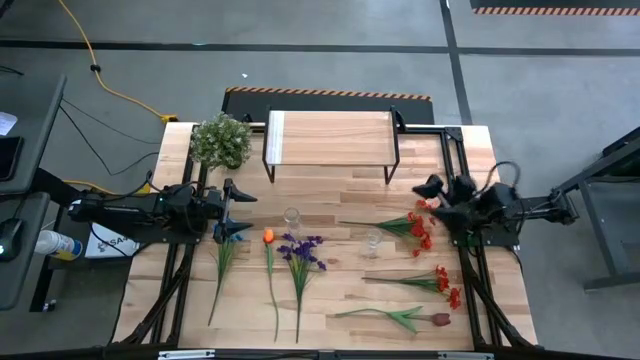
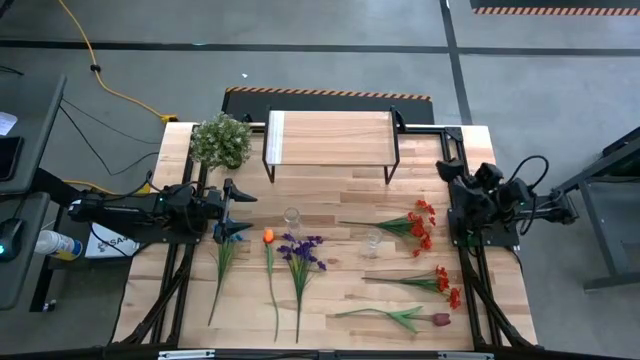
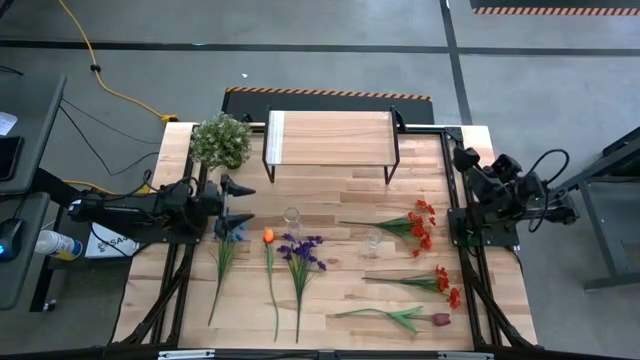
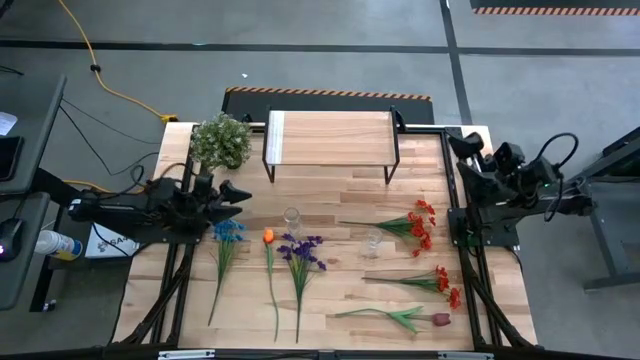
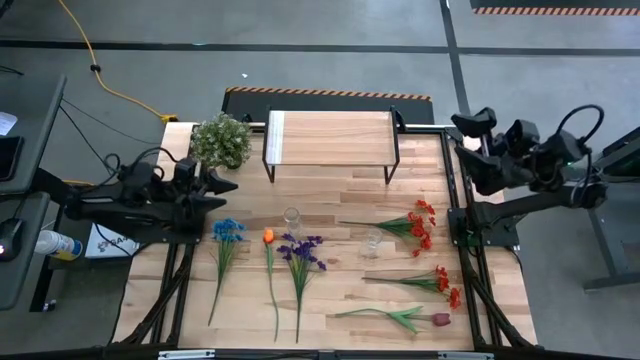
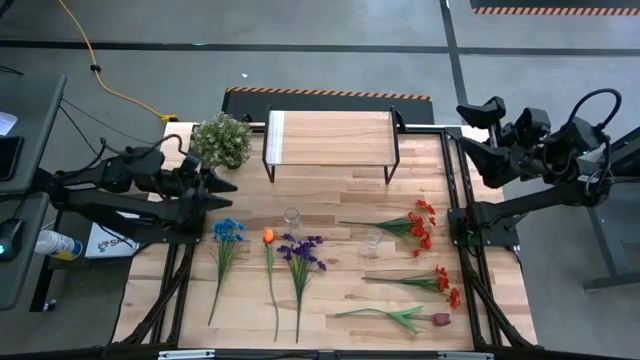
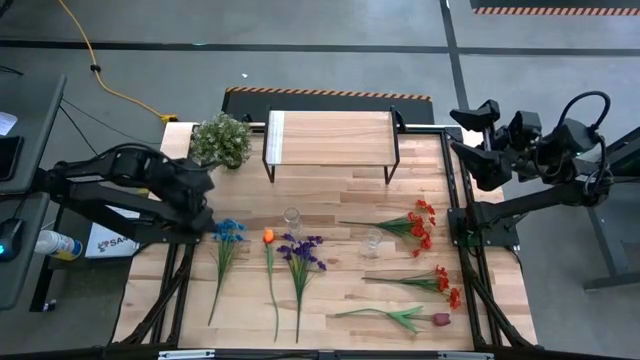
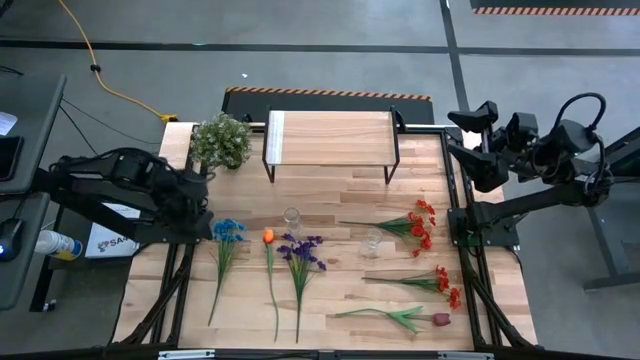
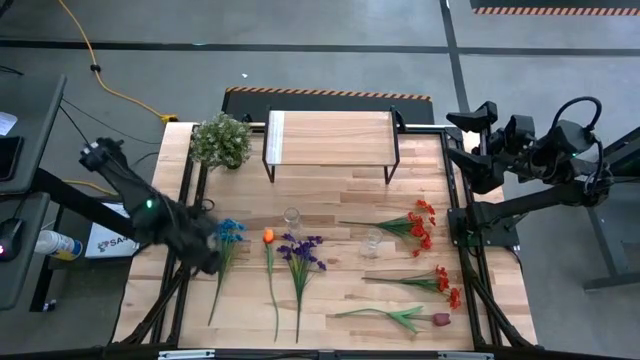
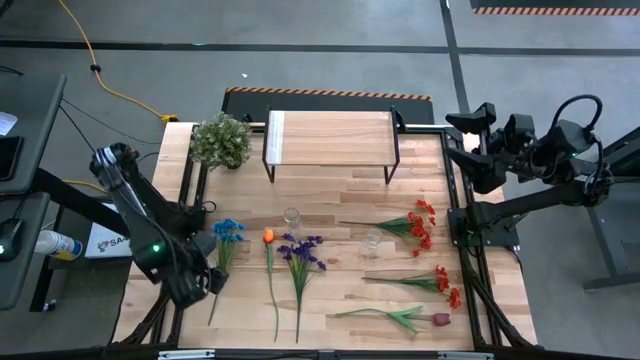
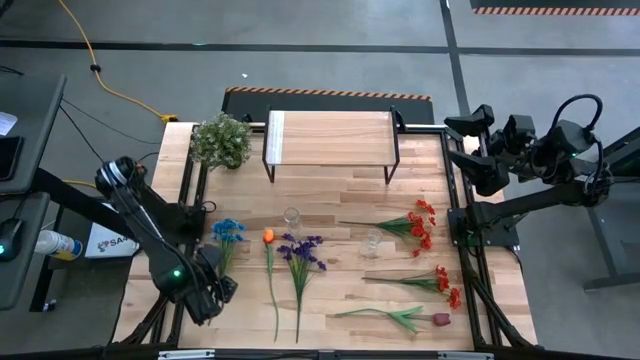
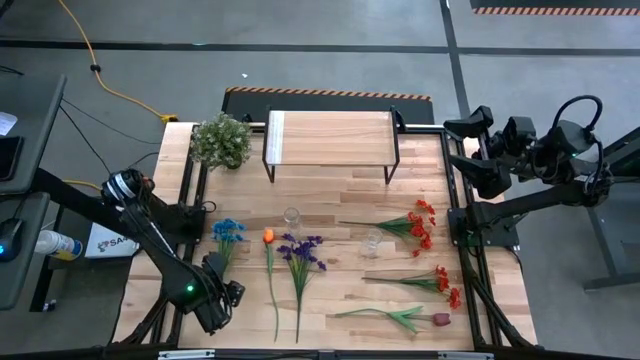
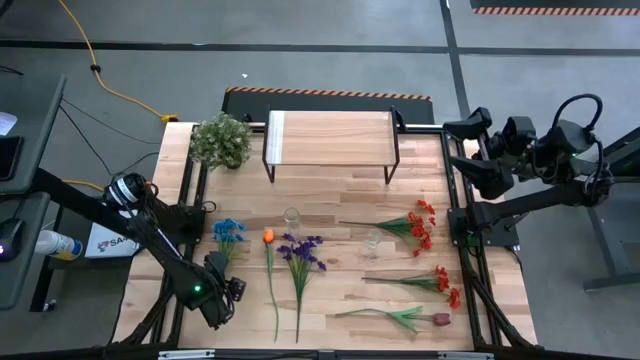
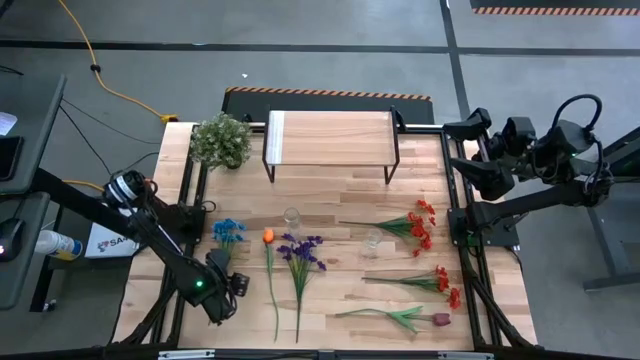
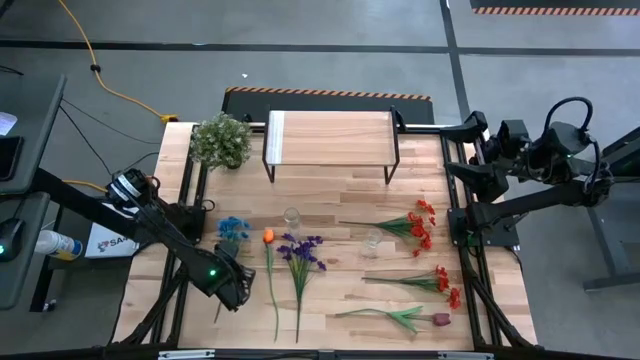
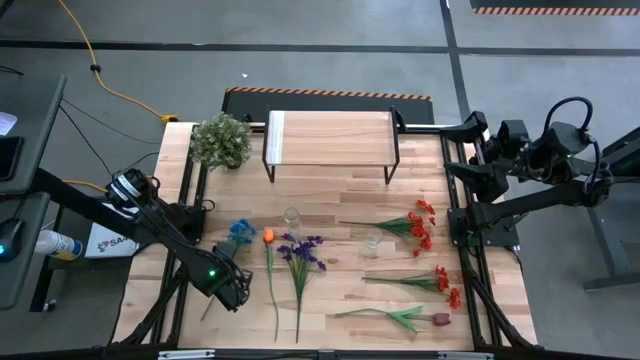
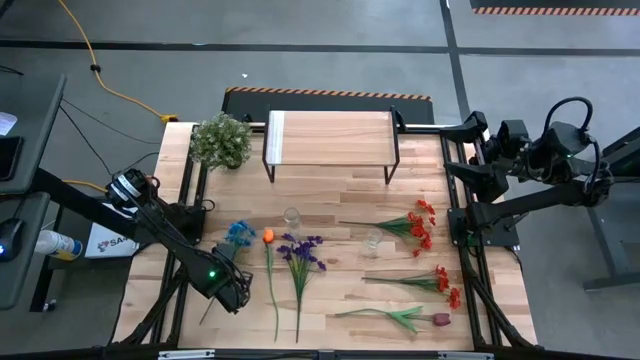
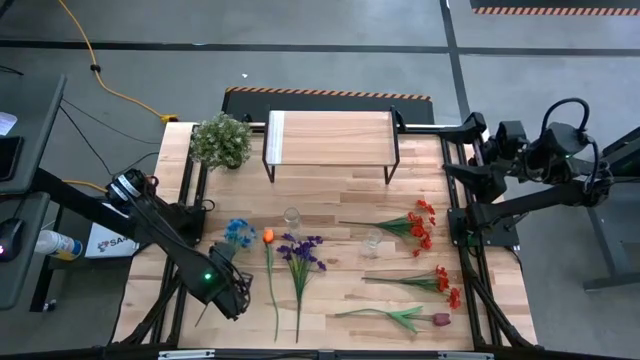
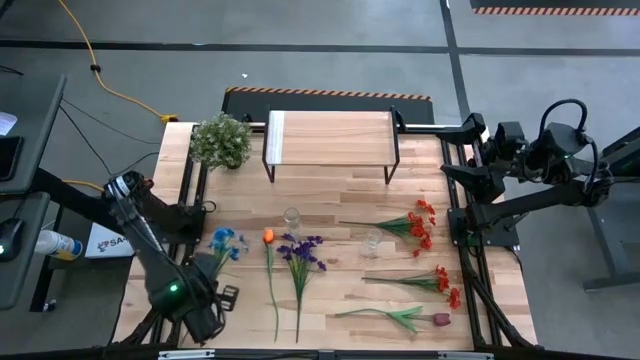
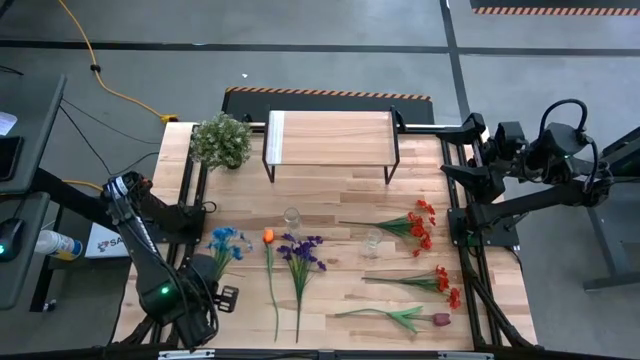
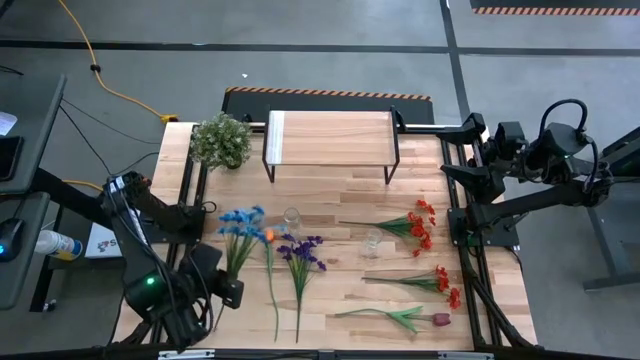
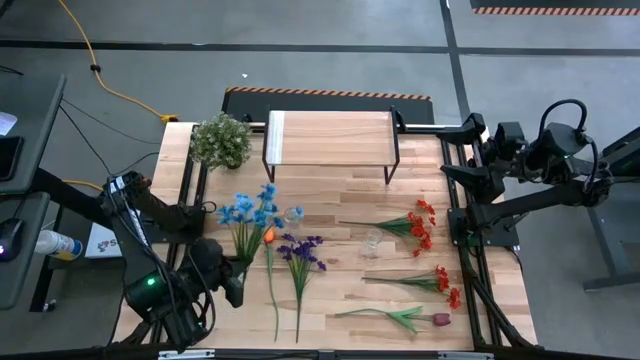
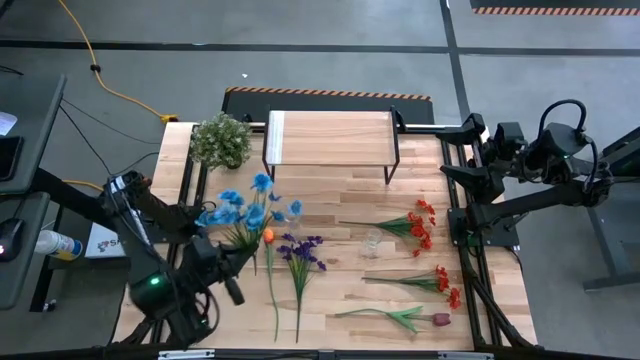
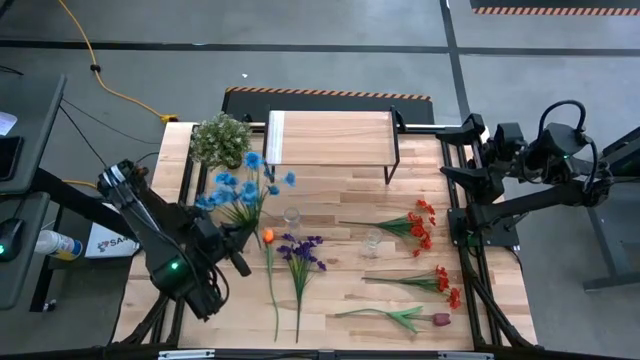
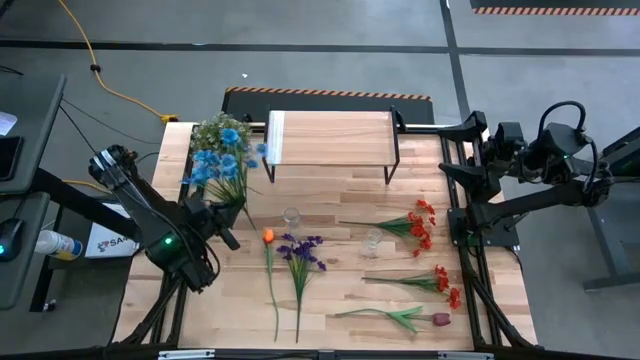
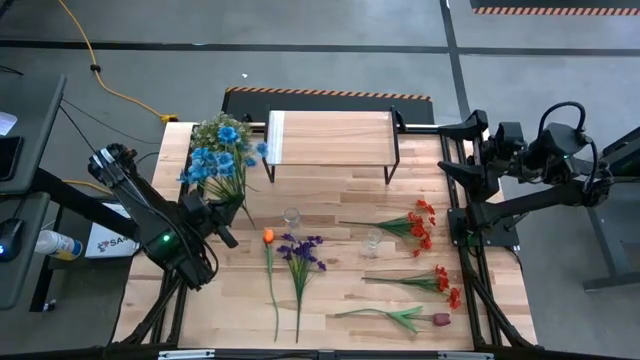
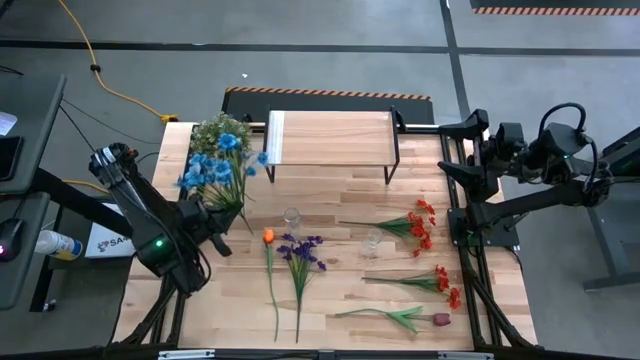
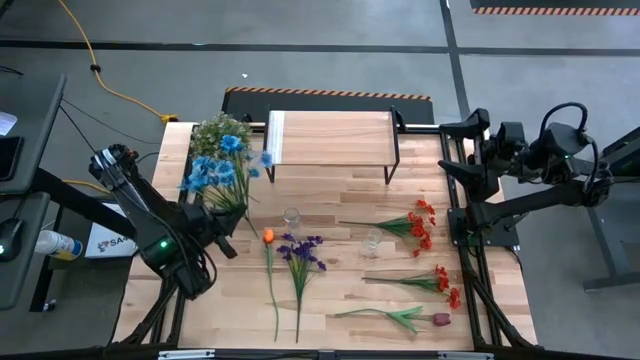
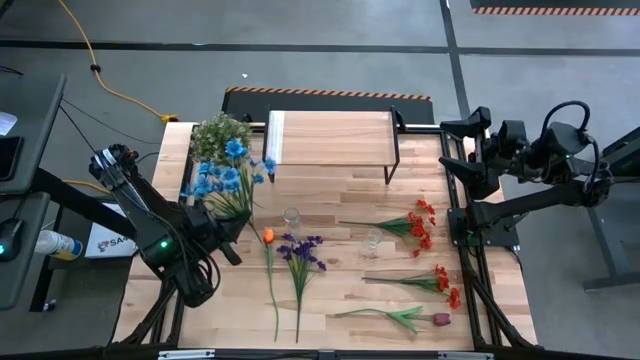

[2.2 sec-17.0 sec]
Task: Pick and place flowers into a vace then onto a shelf
Put the blue flowers into the left transparent vase

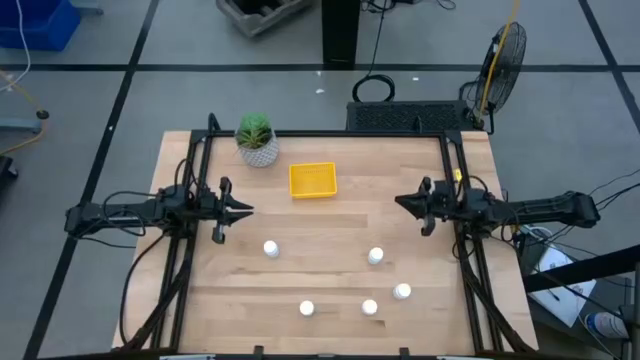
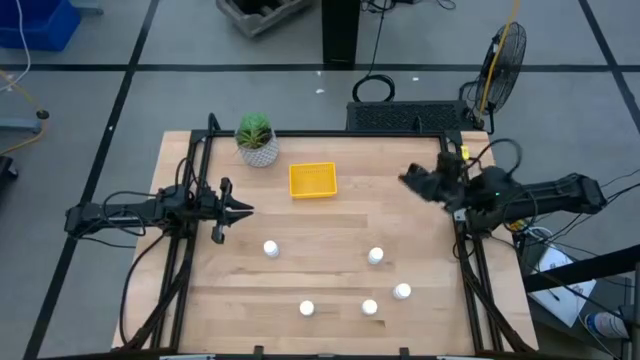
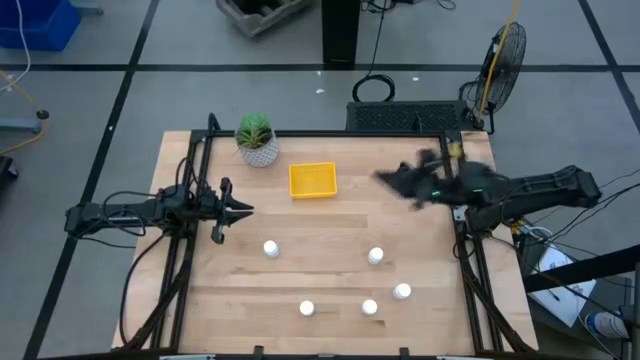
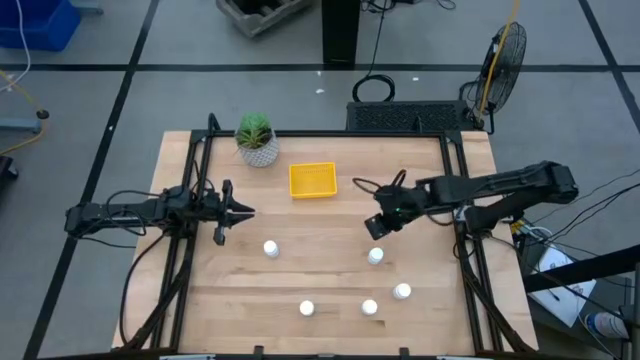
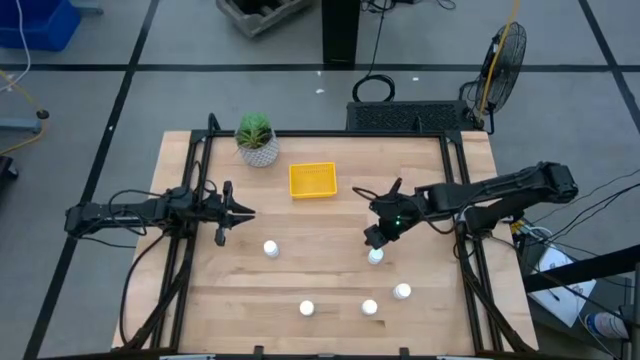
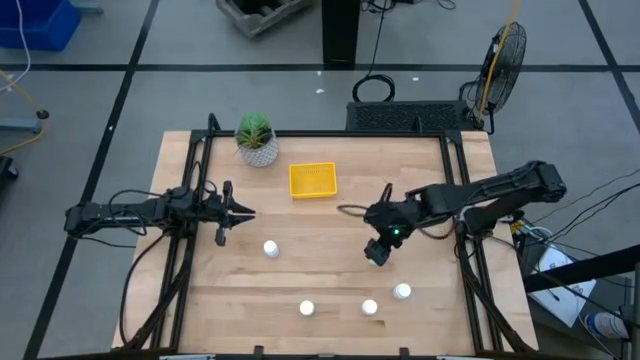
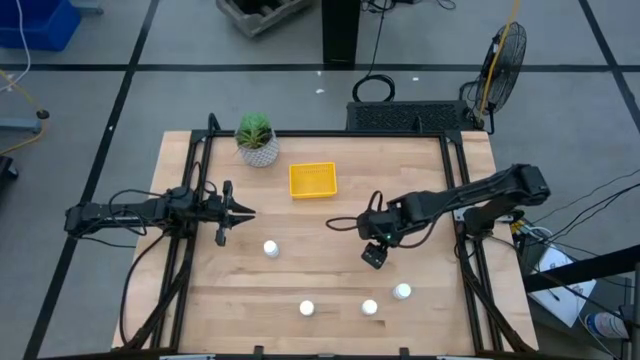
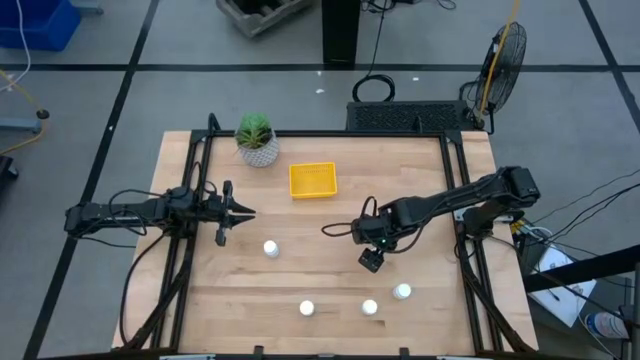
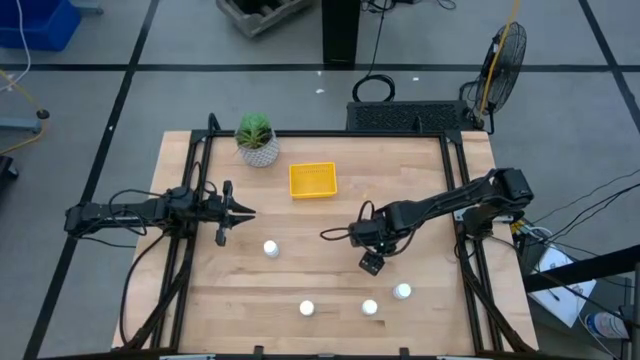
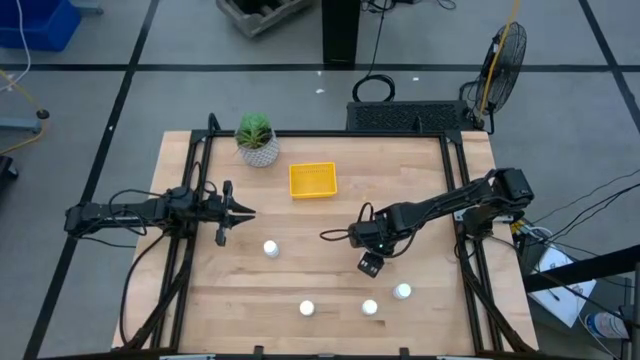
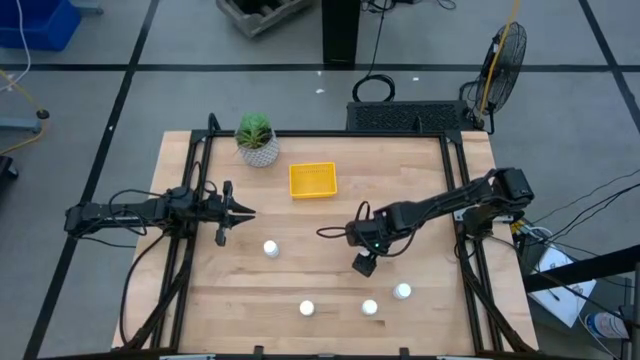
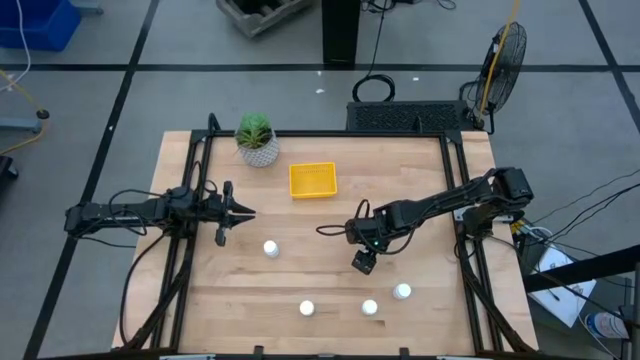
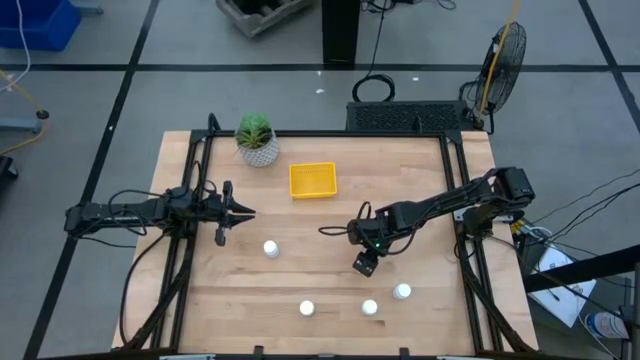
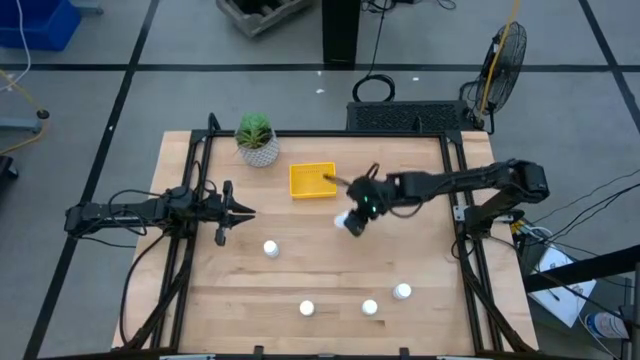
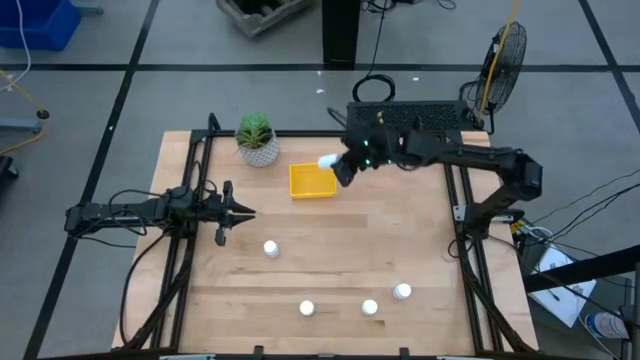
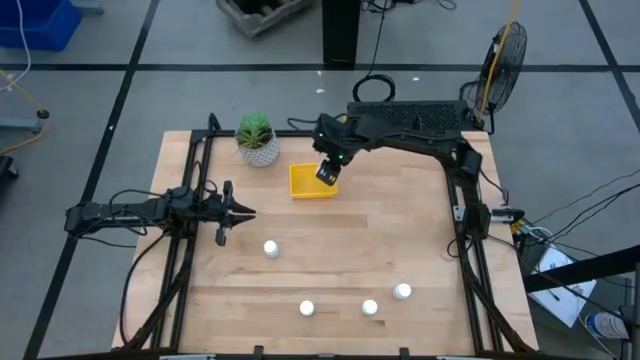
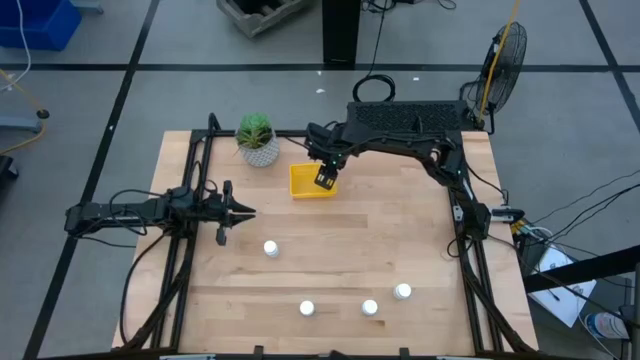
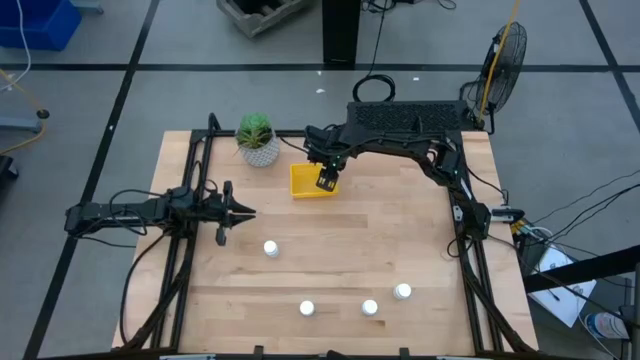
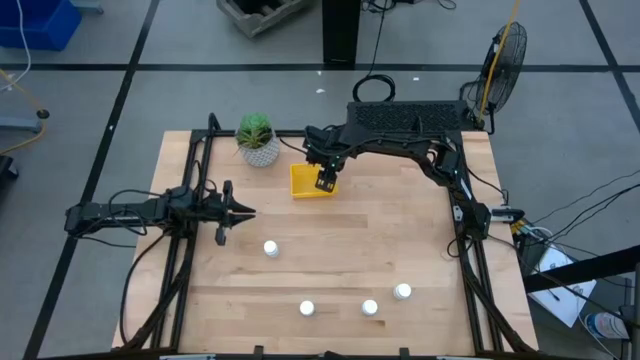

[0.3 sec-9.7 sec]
Task: Pick and place pill bottles into a basket
Put the white pill bottle into the yellow basket
